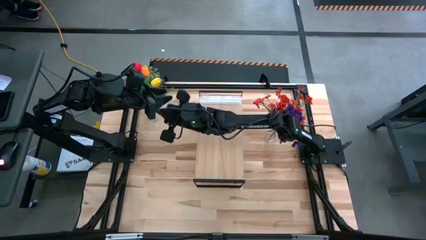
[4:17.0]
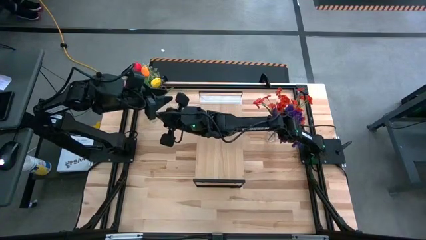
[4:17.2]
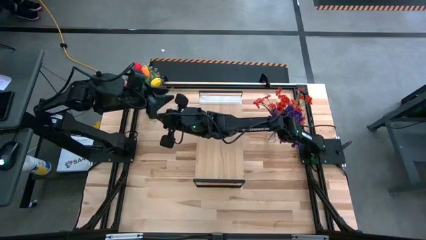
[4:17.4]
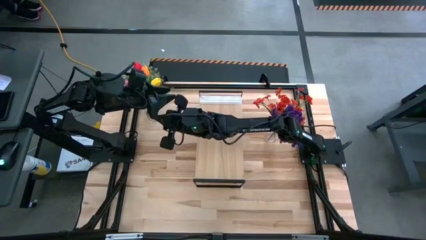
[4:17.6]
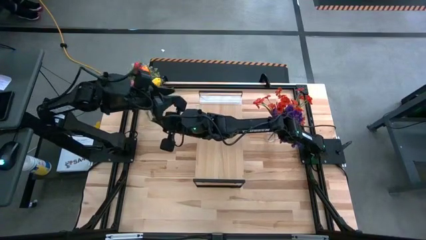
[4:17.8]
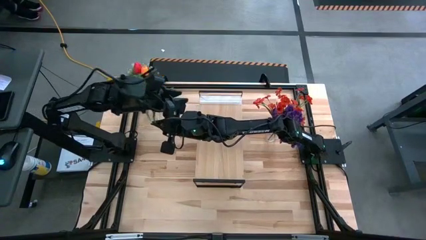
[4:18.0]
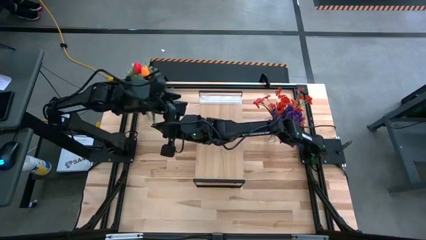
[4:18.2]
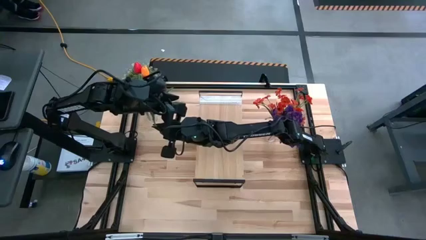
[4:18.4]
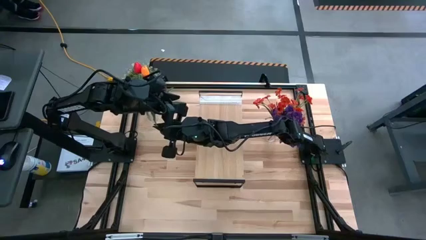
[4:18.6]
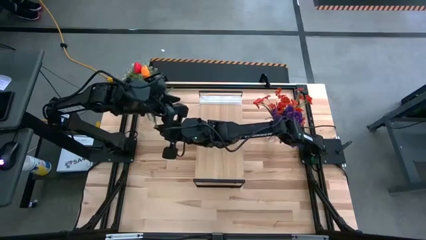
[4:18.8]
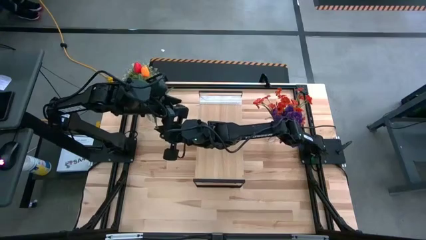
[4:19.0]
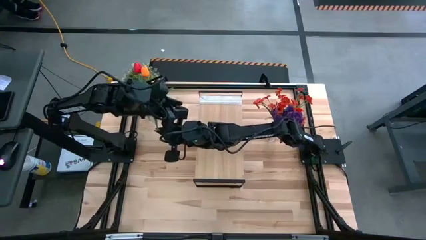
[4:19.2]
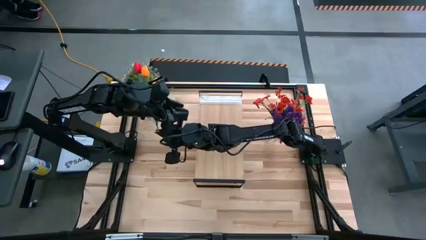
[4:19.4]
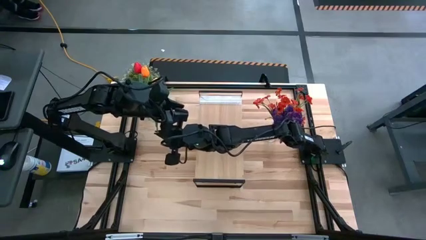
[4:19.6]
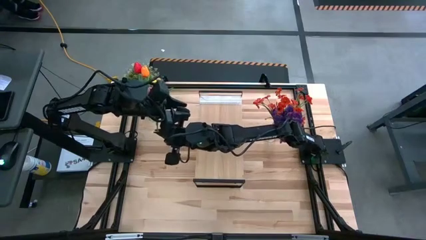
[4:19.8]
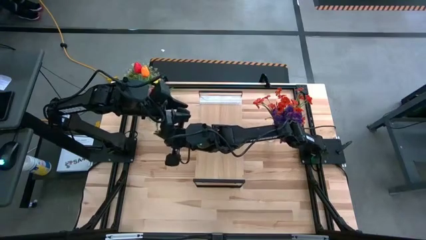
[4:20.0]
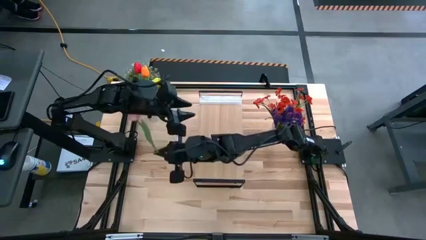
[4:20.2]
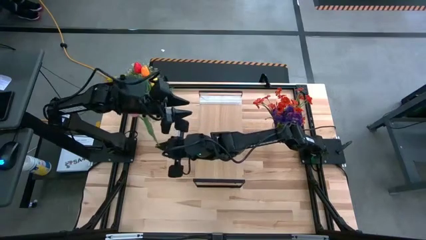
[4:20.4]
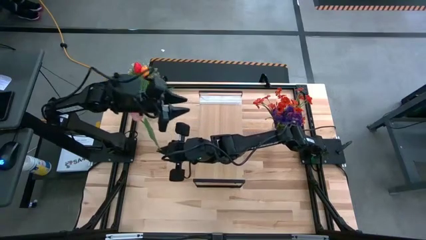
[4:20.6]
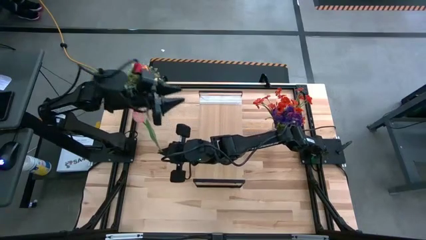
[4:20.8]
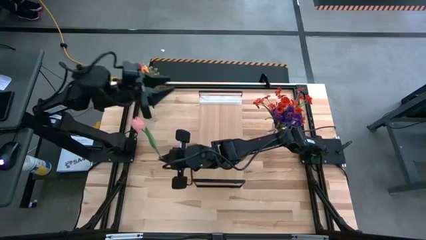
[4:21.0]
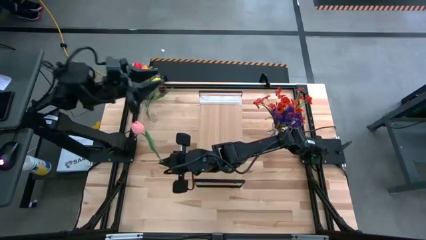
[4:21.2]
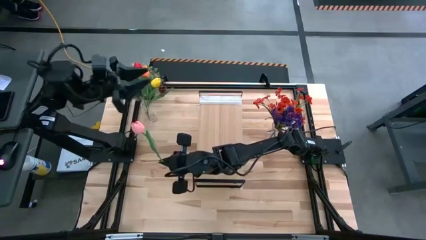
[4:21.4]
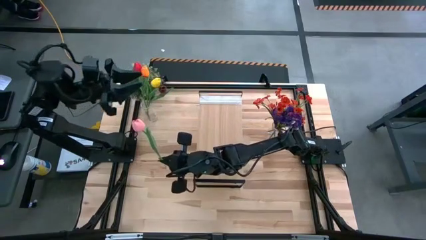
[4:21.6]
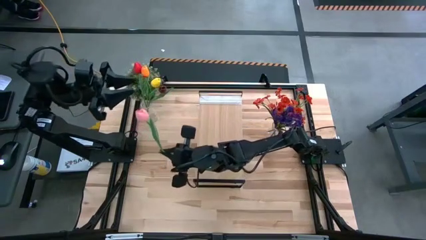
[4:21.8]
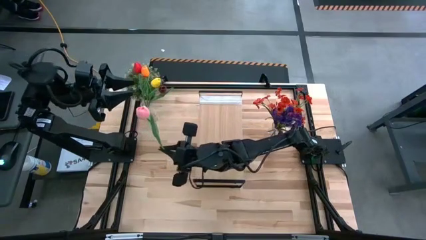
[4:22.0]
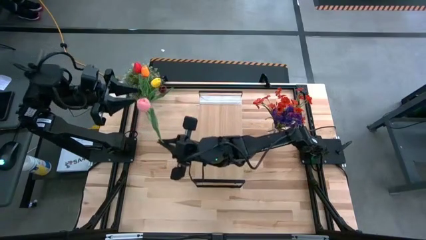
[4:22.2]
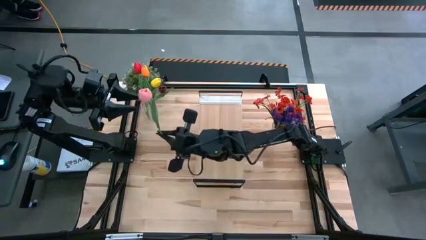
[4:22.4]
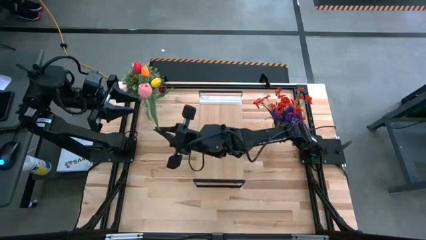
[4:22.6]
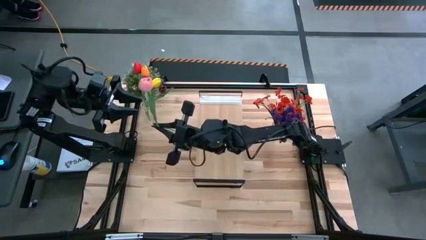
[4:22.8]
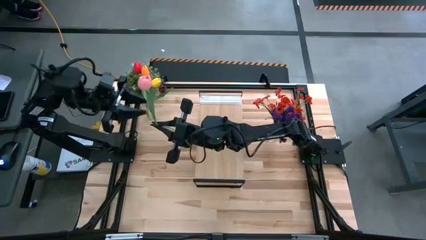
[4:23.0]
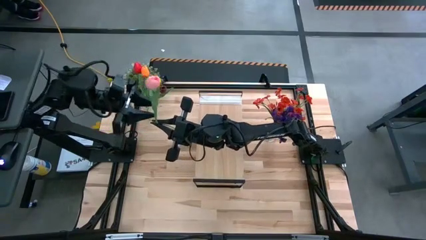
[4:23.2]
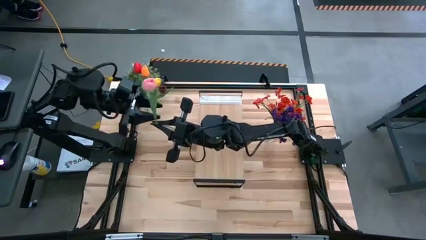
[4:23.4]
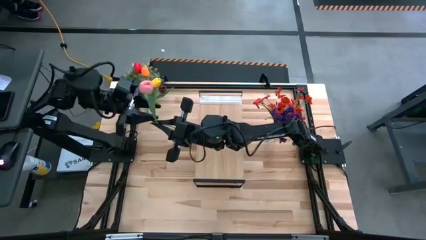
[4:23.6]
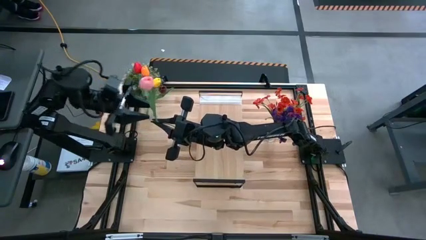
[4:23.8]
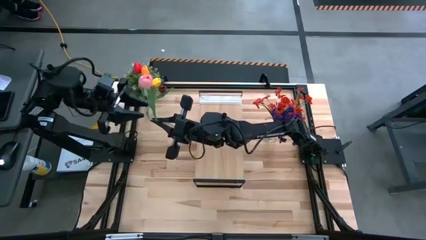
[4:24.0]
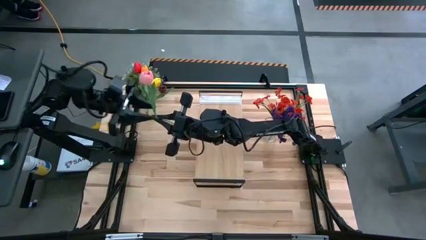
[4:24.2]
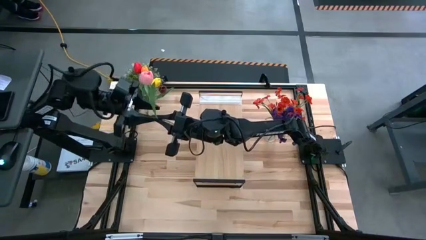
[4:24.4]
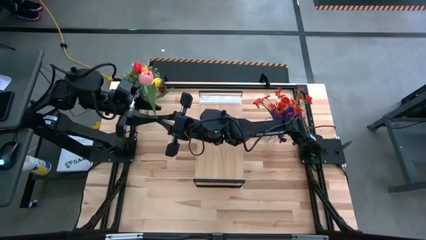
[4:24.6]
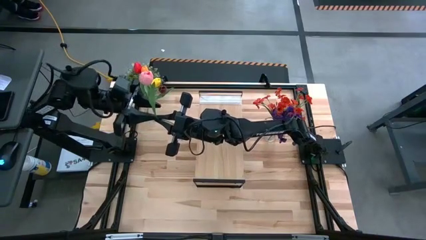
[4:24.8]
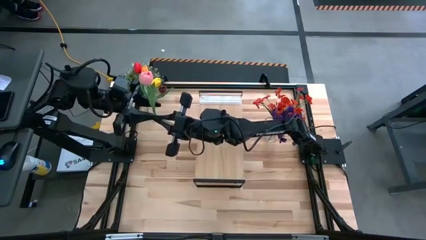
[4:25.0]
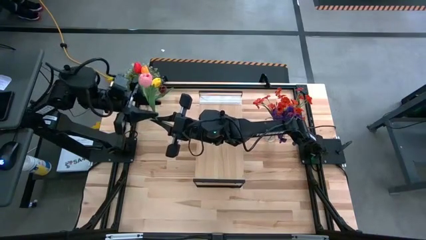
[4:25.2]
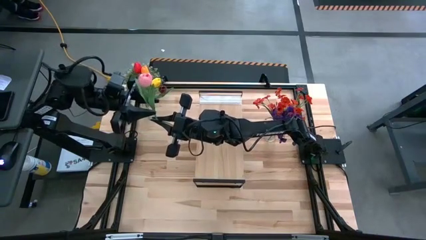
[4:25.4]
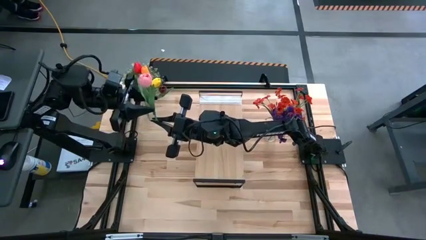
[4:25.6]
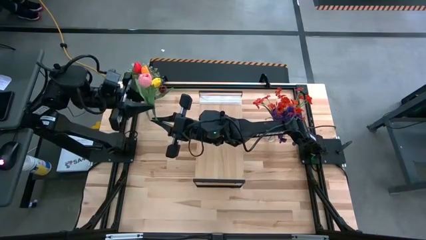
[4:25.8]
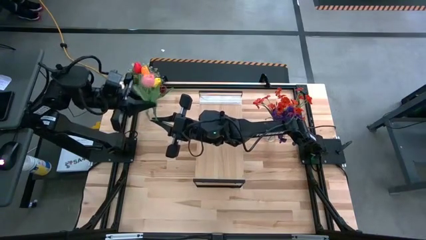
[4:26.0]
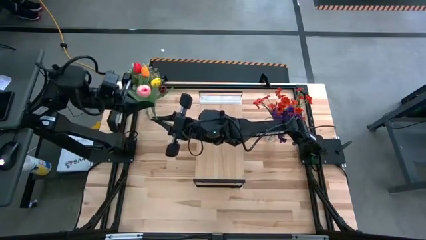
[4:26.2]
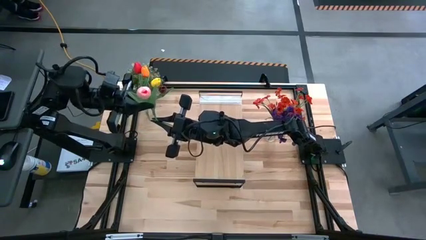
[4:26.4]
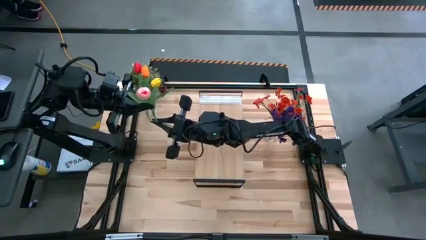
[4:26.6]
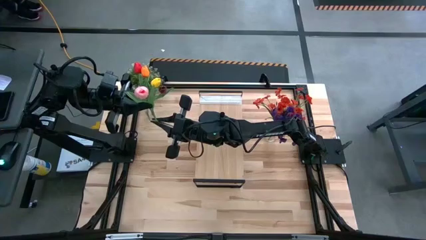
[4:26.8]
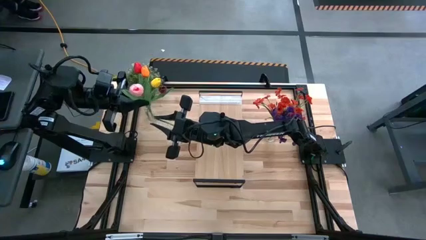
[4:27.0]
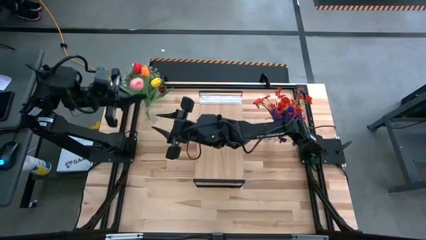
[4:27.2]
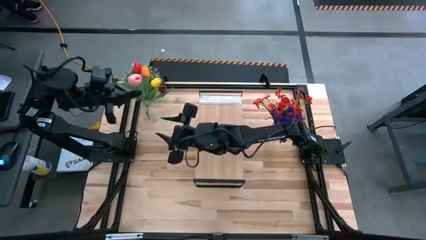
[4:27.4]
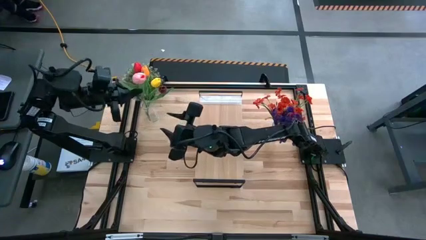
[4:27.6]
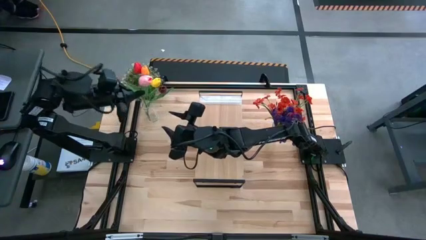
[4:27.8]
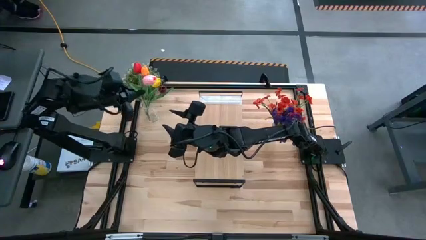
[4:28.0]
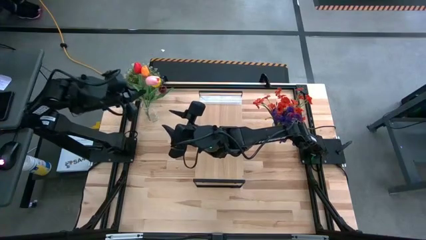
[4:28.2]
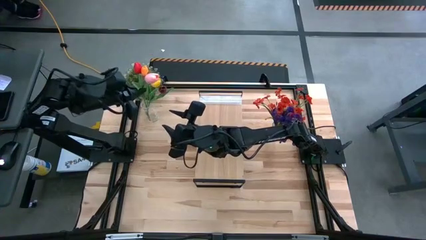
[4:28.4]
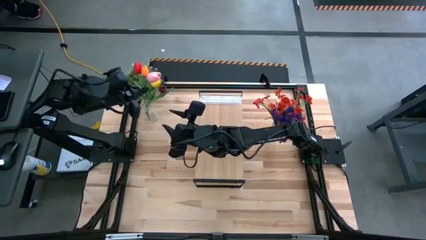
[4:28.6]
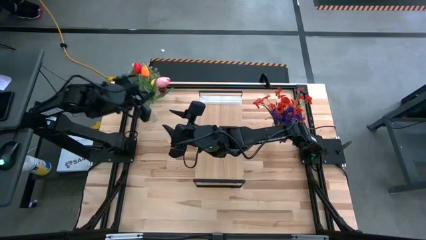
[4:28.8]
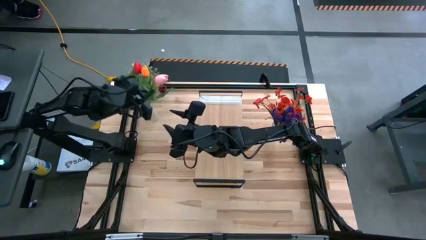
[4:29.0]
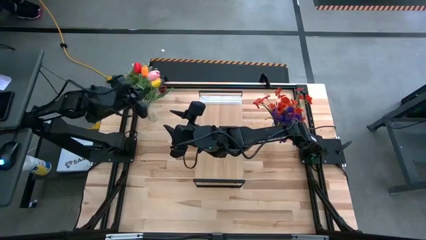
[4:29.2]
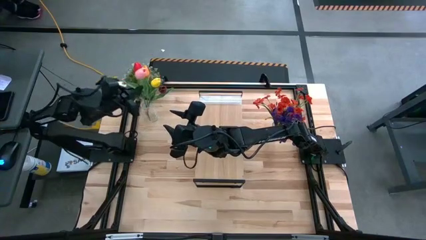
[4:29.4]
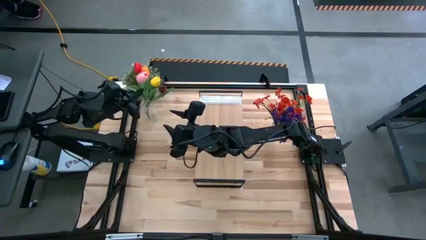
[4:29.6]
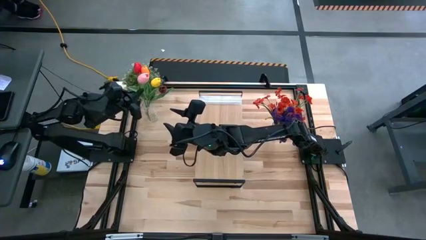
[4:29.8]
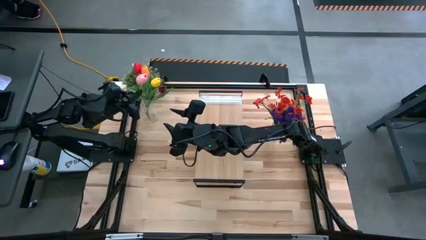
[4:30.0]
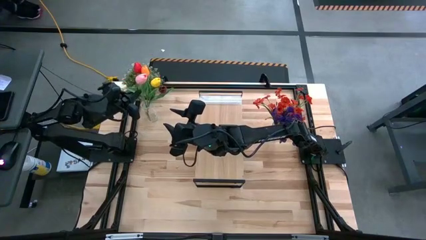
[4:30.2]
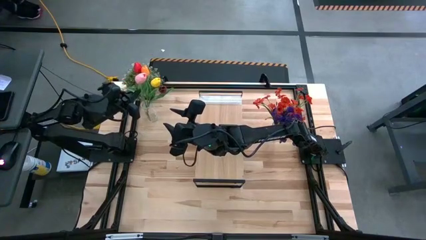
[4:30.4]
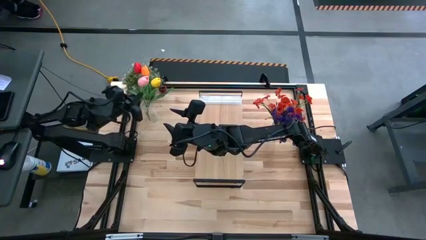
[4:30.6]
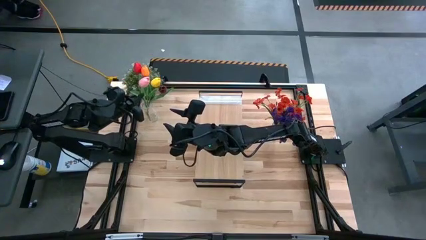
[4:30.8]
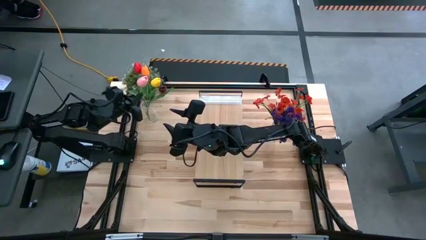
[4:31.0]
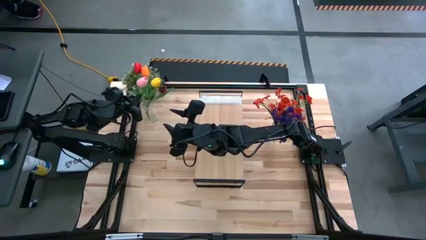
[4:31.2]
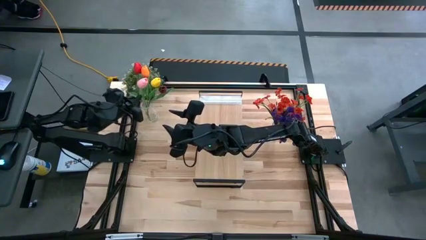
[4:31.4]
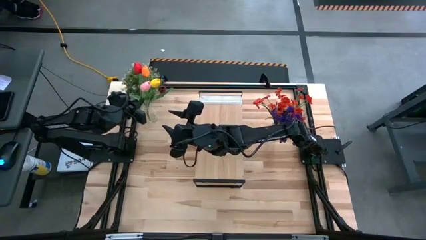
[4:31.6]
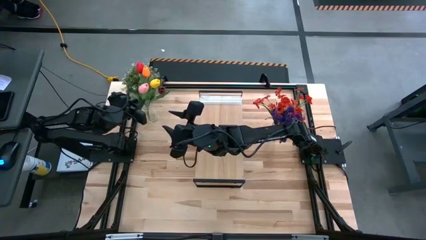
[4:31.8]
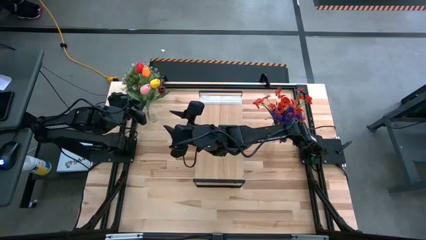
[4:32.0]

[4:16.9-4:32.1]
Task: Pick and place flowers into a vace then onto a shelf
Put the pink tulip into the left transparent vase
